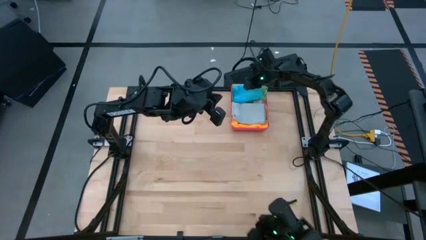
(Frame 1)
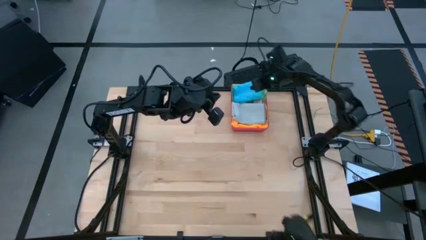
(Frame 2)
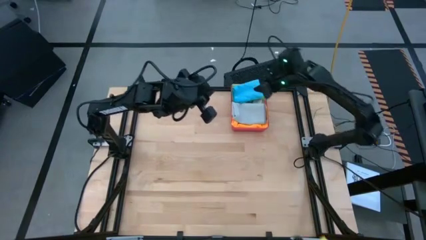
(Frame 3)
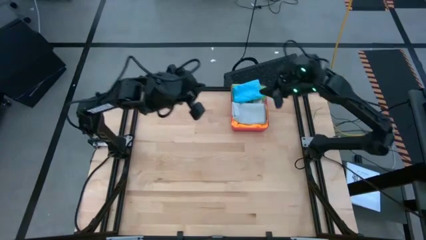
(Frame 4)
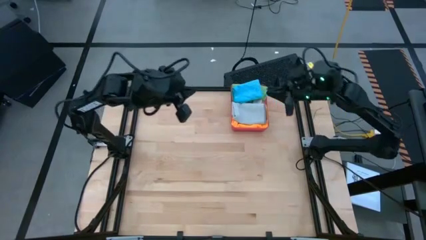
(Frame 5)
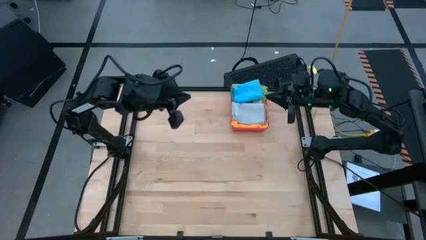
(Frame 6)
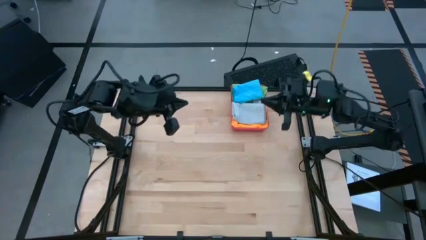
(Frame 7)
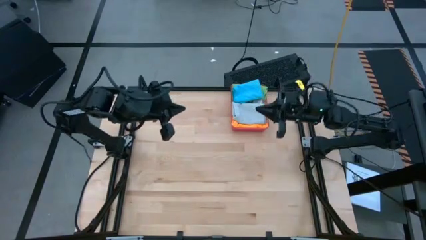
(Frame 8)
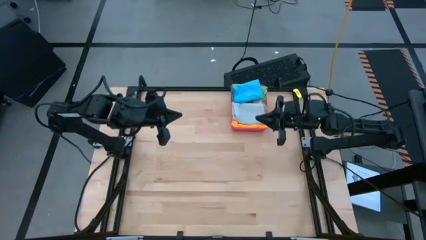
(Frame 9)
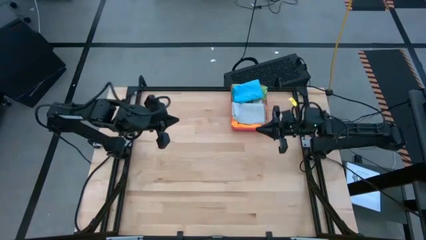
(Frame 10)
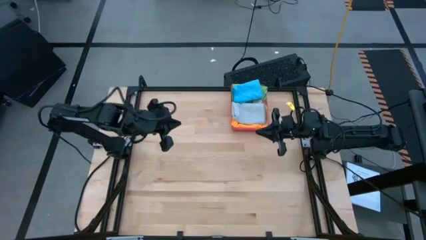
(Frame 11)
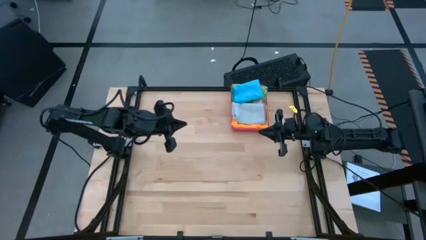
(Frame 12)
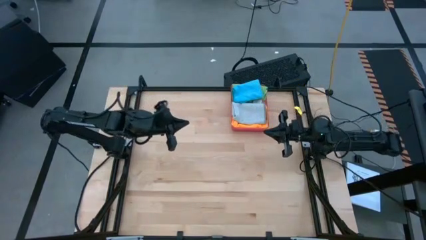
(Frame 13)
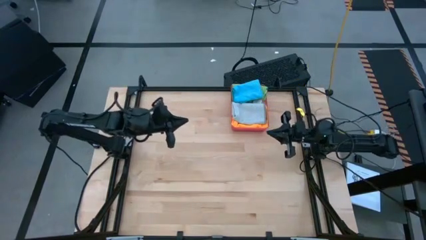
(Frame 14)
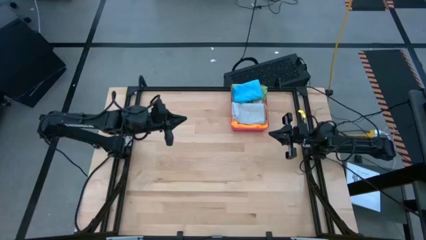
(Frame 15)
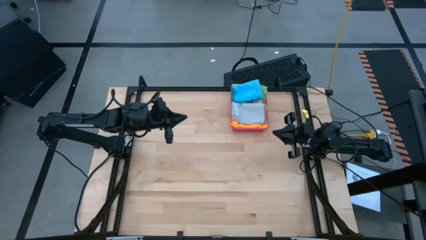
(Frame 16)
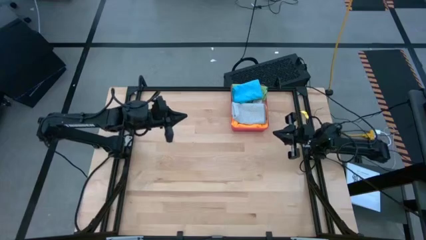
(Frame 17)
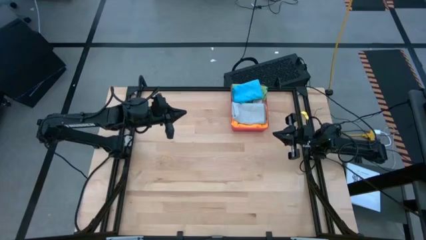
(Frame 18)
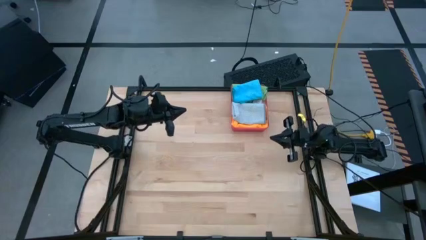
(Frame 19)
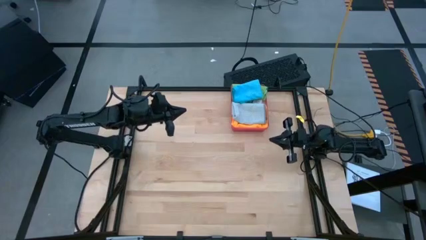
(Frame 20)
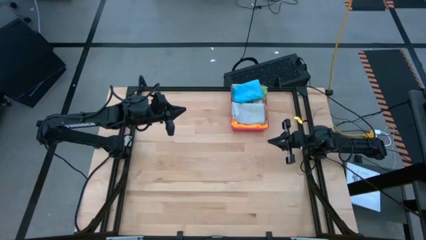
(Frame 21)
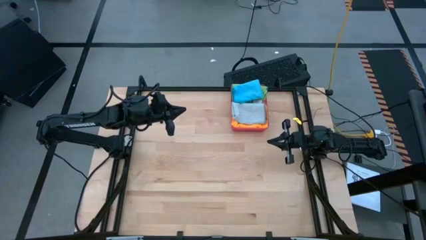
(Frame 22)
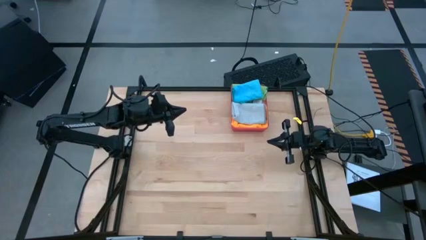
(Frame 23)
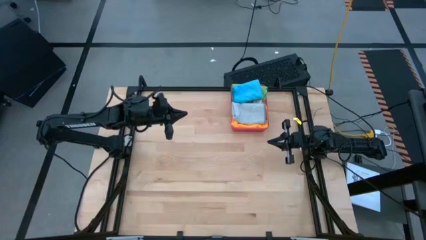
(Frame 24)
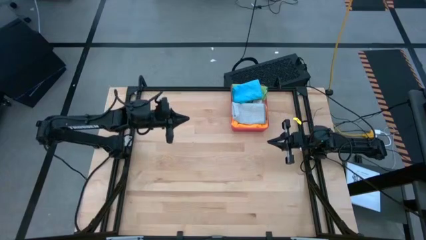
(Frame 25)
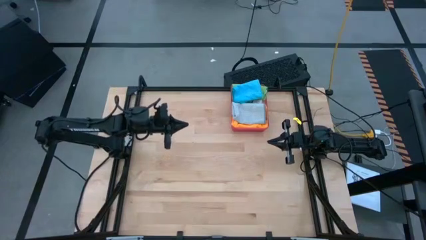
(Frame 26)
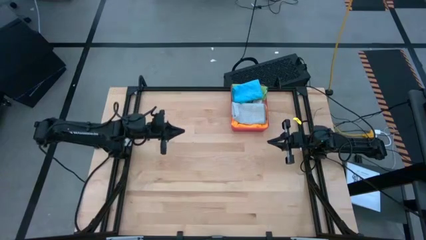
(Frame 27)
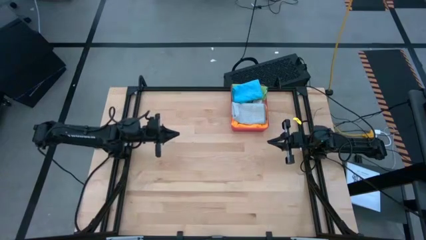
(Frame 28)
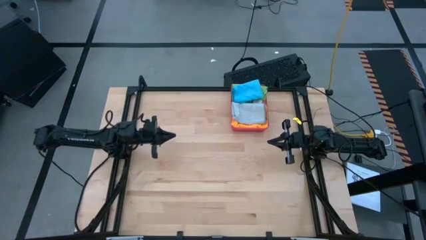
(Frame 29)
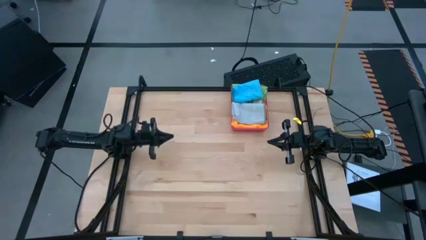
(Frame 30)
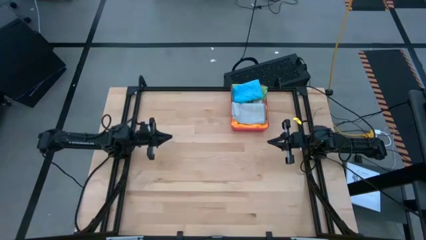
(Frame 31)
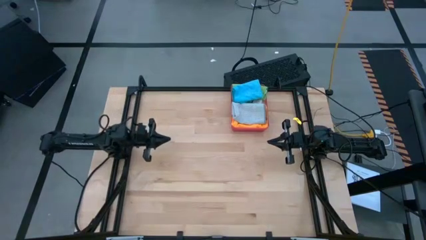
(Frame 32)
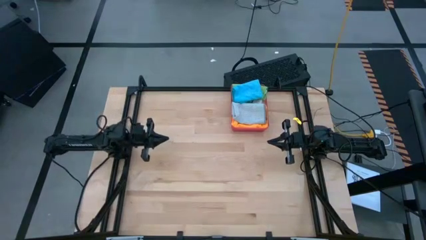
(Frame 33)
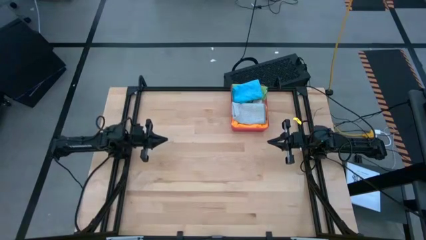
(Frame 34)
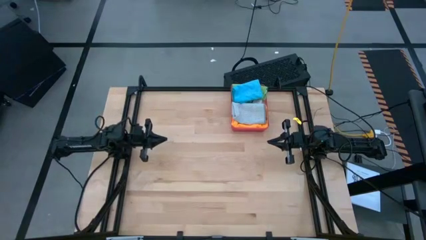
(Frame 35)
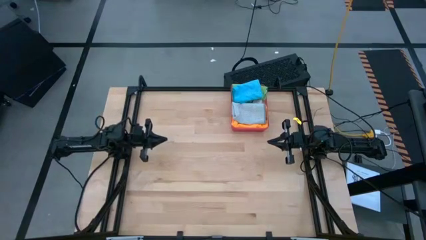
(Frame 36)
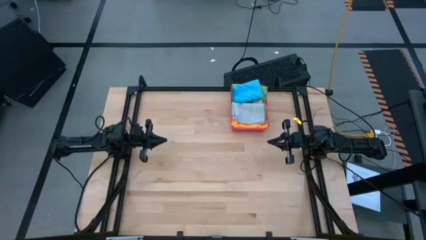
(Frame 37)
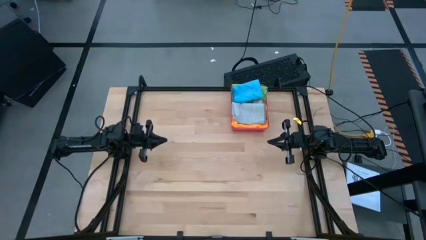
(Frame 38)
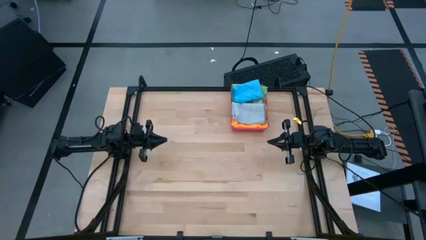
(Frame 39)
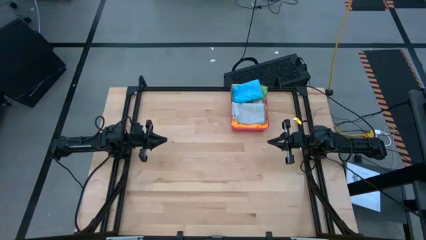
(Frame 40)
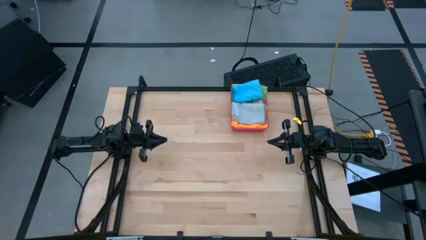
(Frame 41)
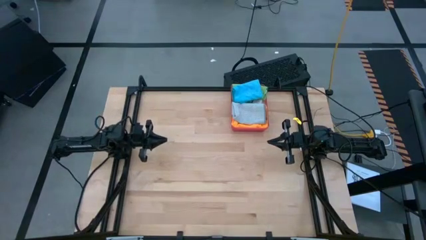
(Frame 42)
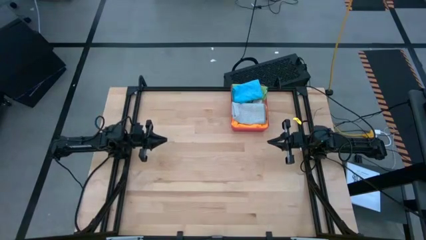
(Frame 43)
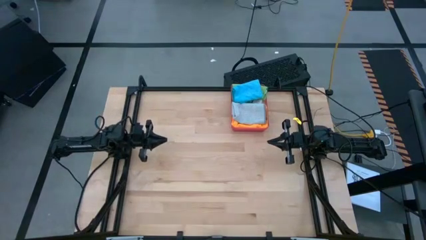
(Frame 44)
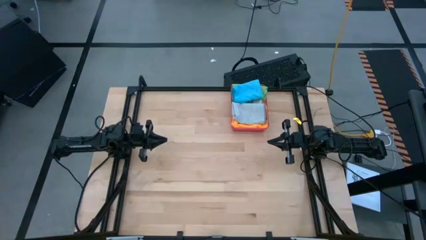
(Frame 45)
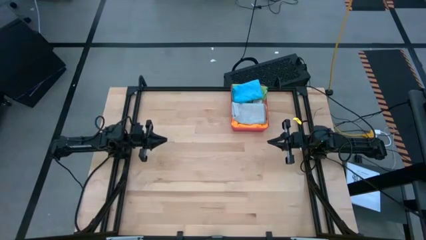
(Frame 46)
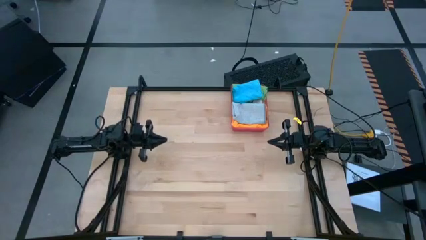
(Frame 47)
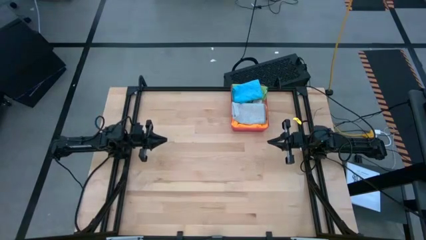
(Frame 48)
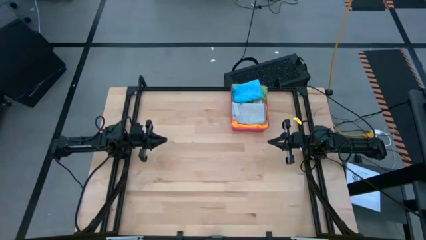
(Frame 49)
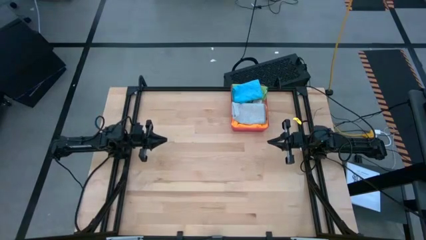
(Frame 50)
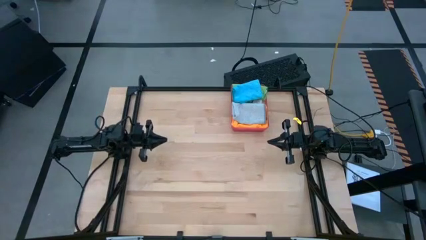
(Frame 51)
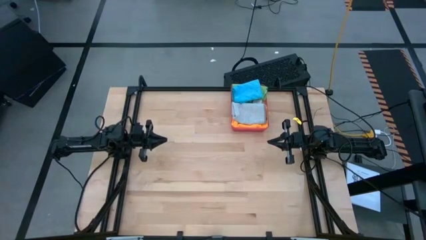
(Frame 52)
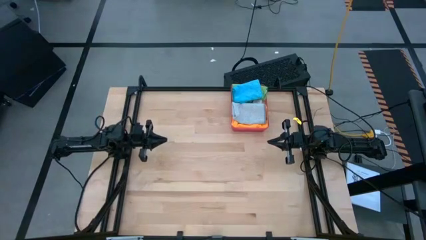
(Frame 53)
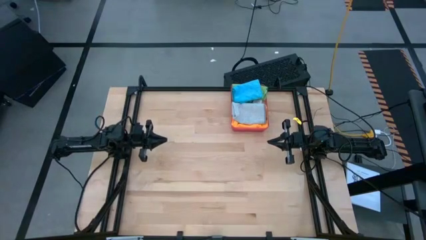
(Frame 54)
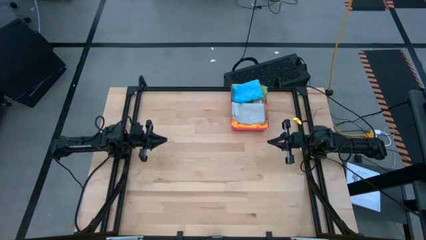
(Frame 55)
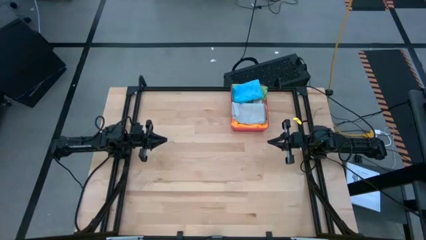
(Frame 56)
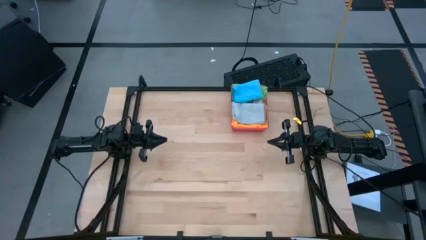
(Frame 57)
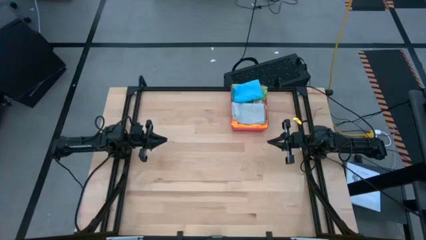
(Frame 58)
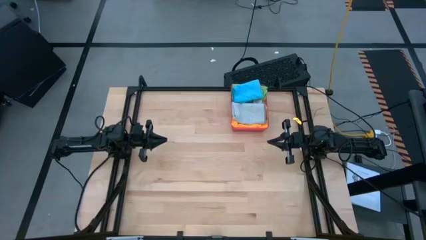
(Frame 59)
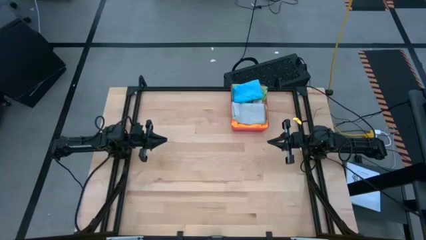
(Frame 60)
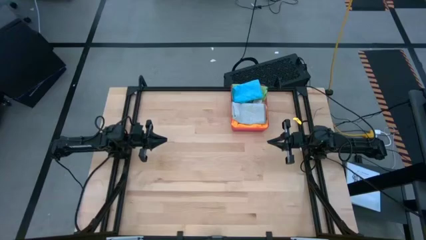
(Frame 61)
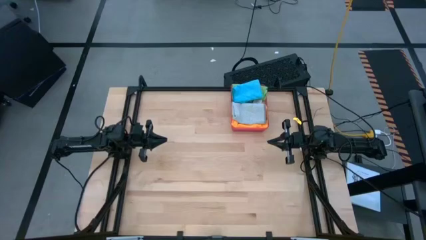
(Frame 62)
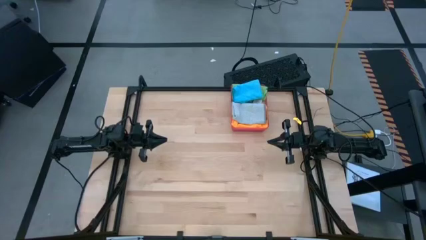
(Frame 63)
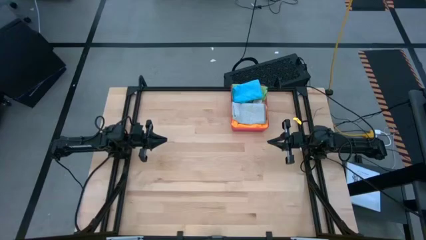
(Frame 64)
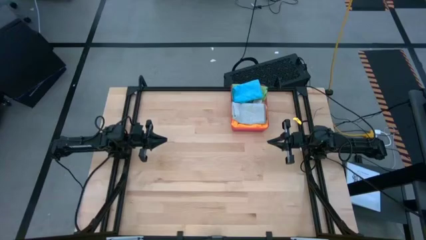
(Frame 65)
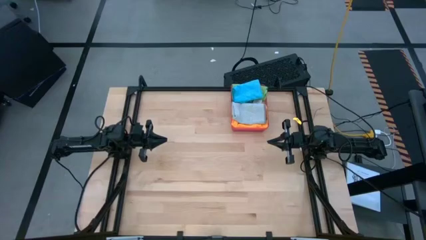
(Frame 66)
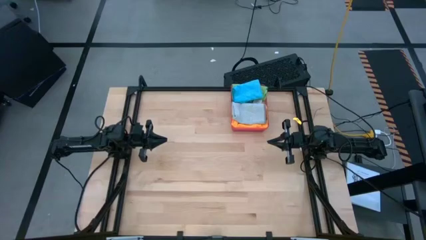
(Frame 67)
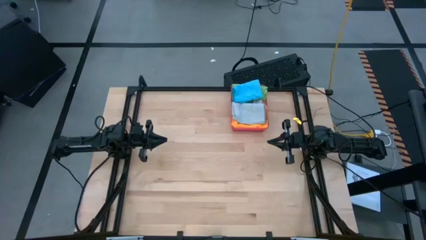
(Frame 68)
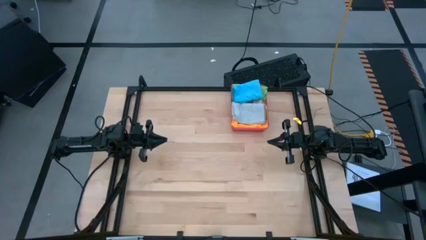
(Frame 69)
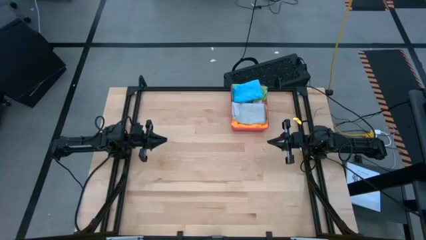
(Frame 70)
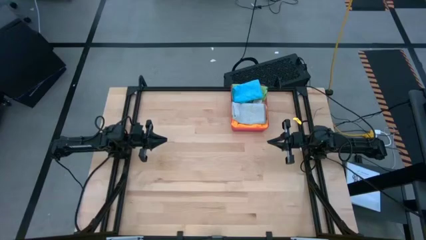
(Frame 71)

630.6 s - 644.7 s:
Task: Fold microfiber towels
Return to Home Position

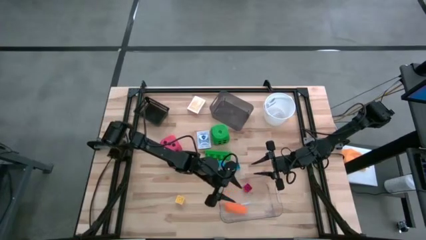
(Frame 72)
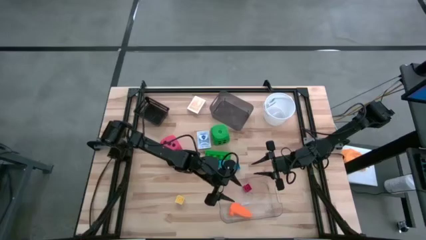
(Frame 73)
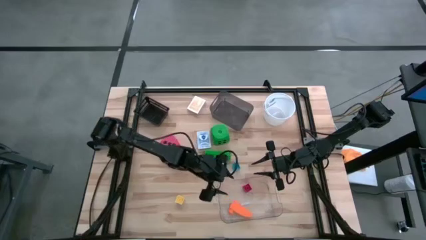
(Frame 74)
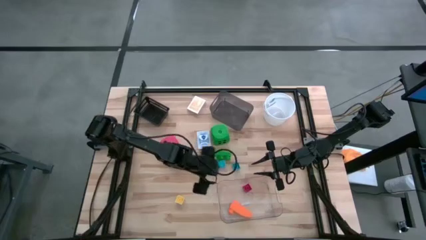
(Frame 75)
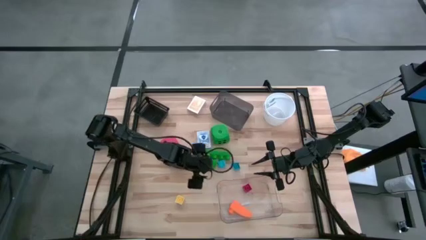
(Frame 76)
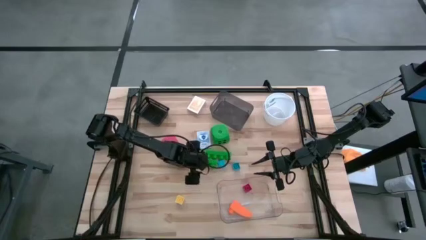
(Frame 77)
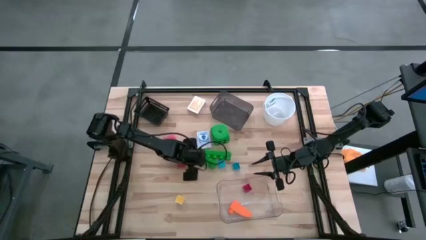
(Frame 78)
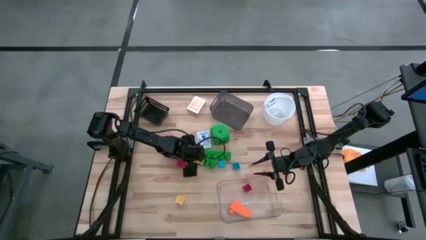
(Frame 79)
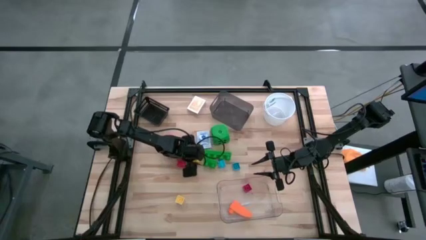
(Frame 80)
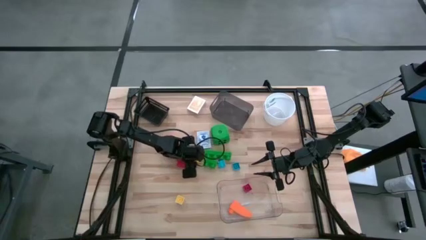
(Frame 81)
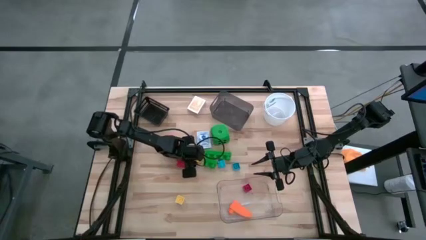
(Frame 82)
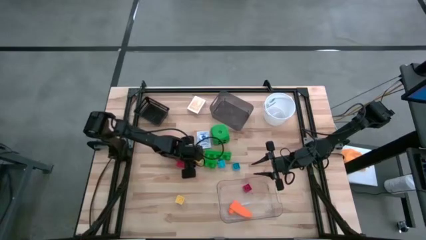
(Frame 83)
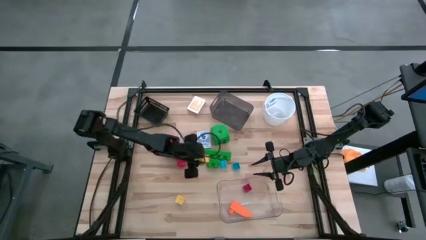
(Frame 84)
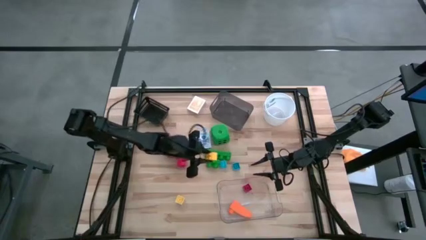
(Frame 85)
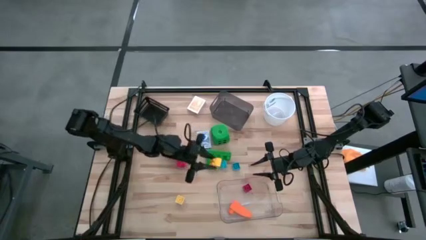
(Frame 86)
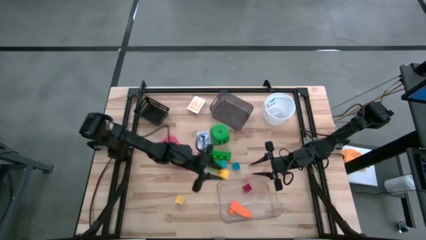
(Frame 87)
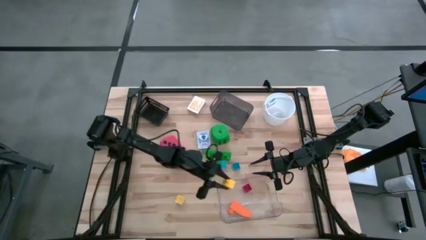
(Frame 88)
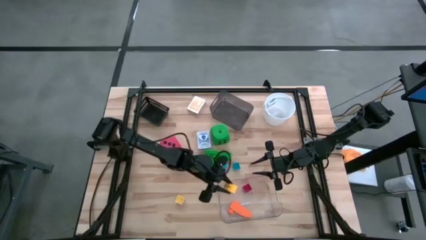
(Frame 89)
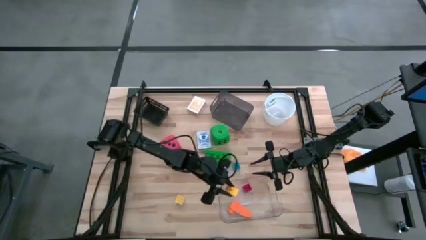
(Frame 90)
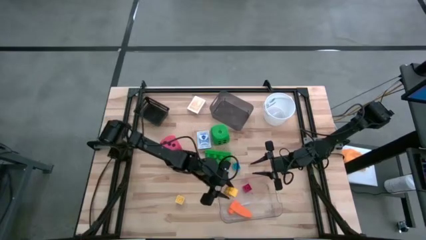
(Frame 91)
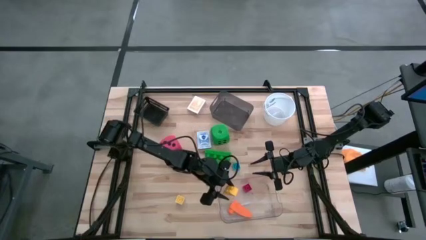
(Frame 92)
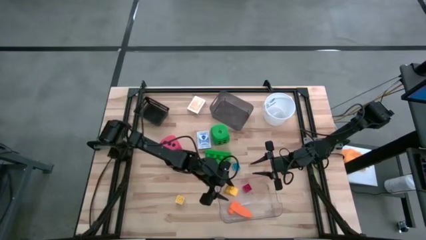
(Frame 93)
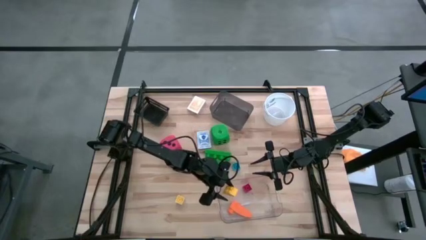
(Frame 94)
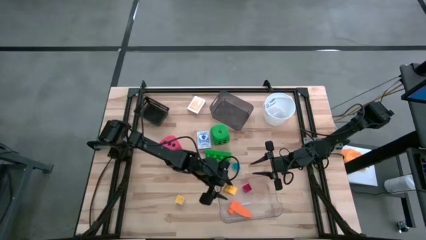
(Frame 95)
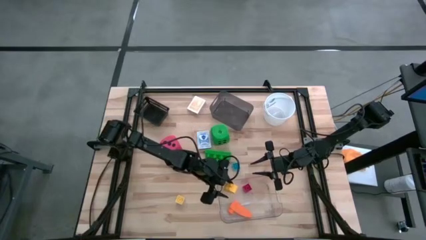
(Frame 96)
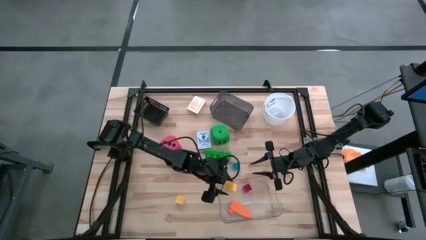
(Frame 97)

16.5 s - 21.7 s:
Task: Pick & Place Toys
Put the top yellow game piece into the bottom transparent bin
